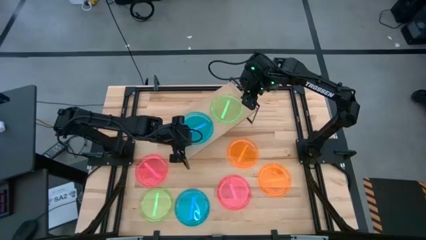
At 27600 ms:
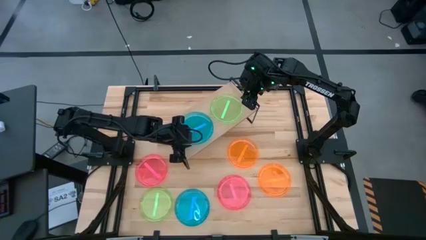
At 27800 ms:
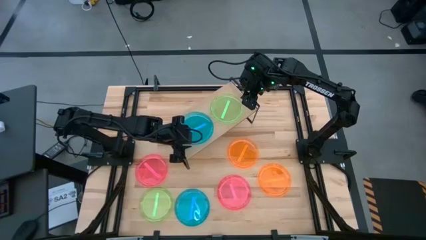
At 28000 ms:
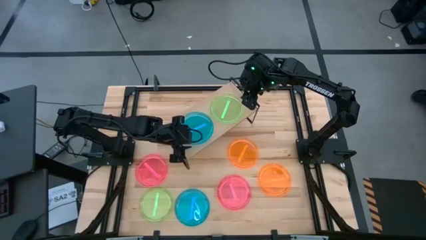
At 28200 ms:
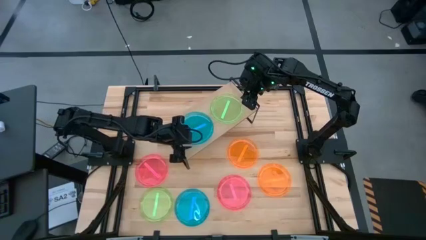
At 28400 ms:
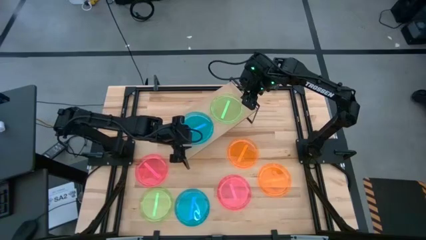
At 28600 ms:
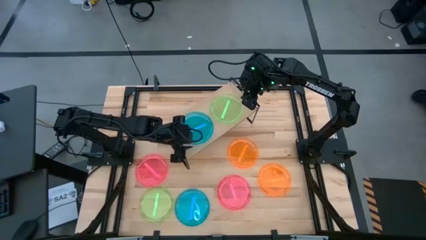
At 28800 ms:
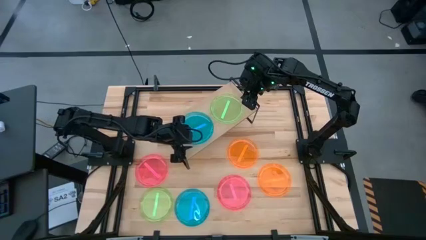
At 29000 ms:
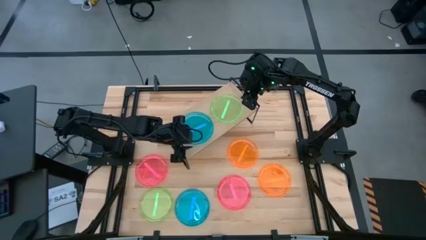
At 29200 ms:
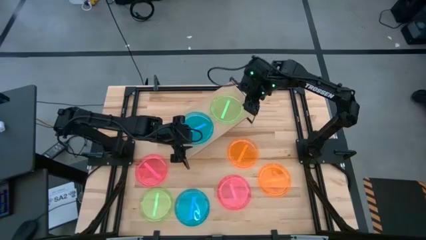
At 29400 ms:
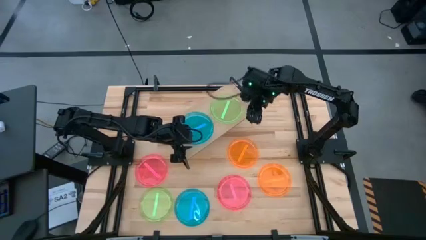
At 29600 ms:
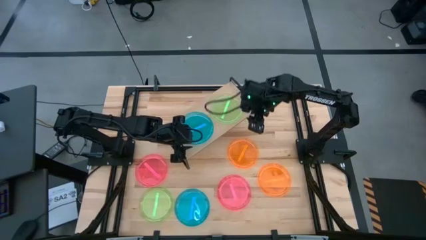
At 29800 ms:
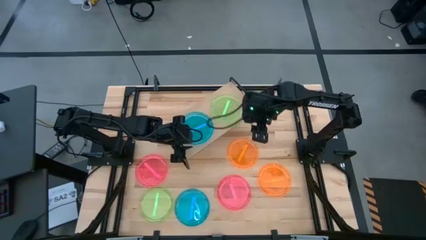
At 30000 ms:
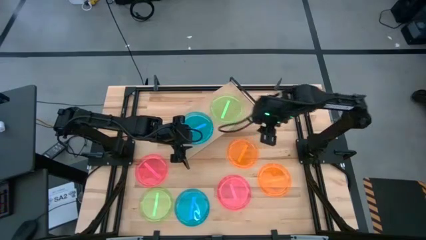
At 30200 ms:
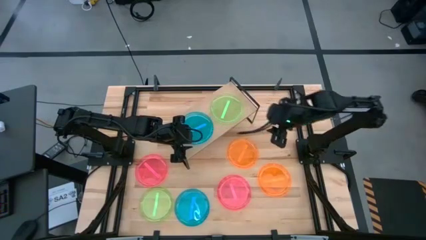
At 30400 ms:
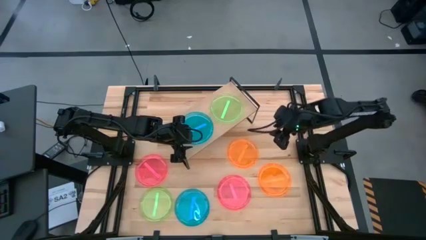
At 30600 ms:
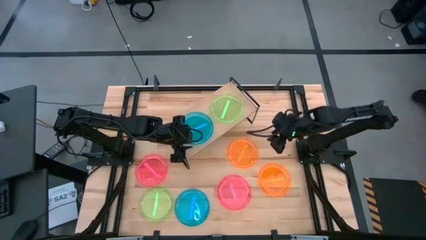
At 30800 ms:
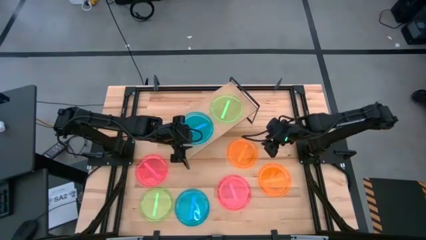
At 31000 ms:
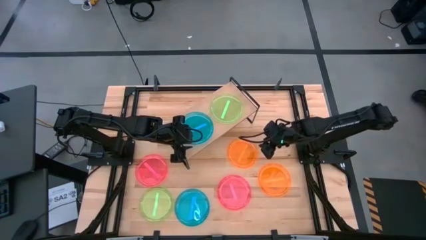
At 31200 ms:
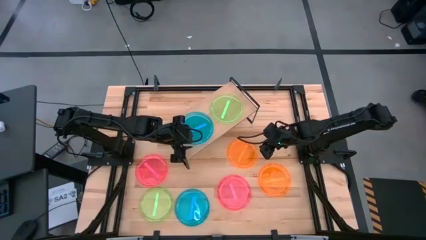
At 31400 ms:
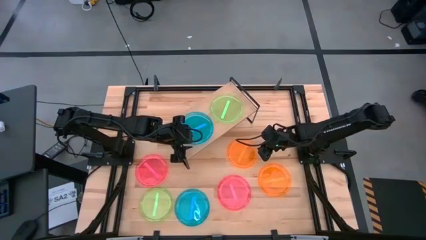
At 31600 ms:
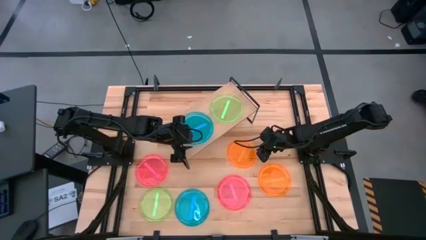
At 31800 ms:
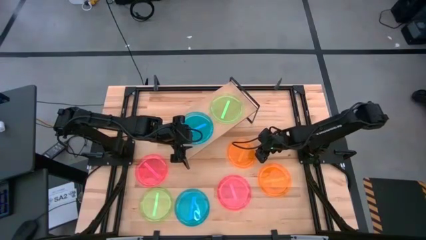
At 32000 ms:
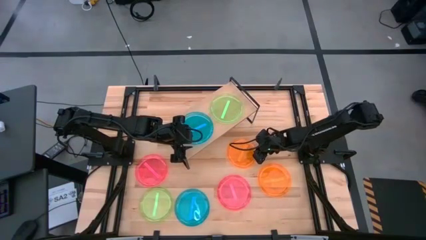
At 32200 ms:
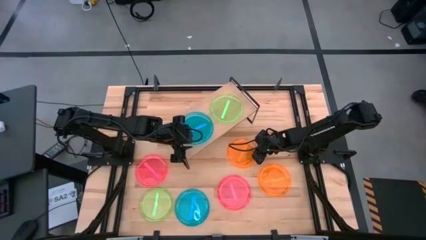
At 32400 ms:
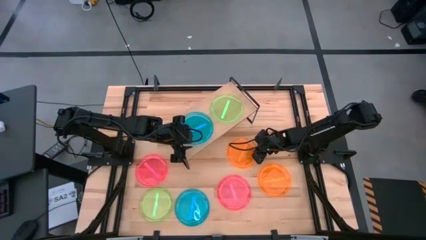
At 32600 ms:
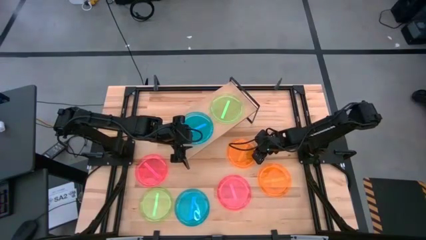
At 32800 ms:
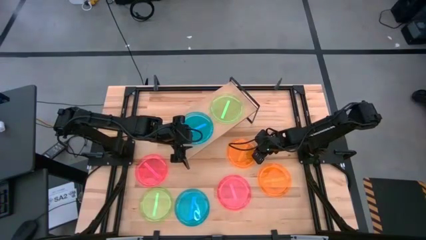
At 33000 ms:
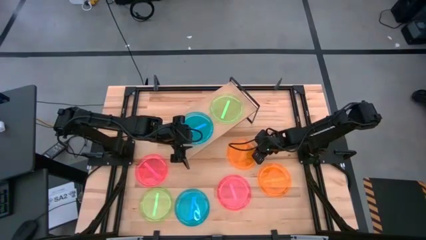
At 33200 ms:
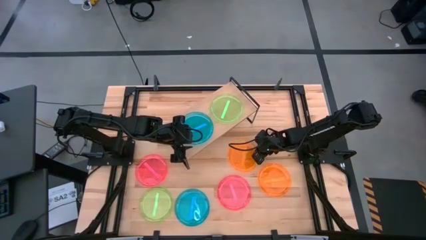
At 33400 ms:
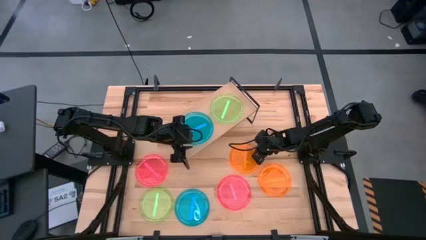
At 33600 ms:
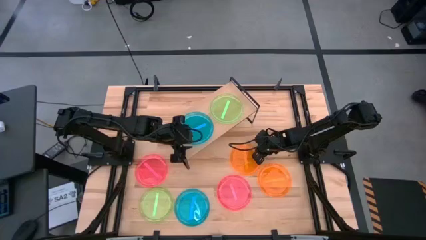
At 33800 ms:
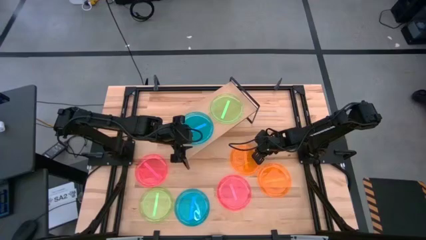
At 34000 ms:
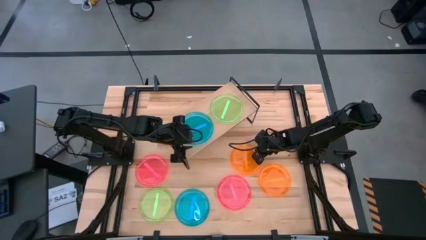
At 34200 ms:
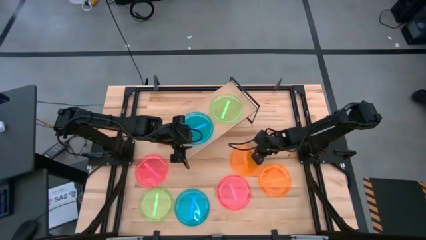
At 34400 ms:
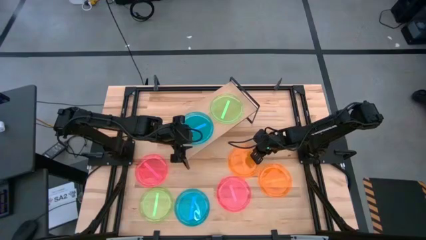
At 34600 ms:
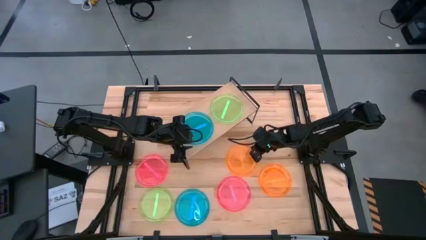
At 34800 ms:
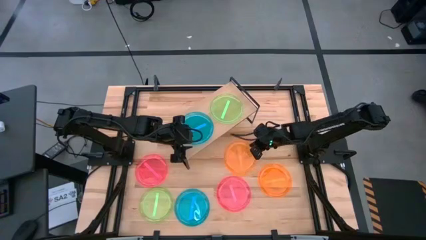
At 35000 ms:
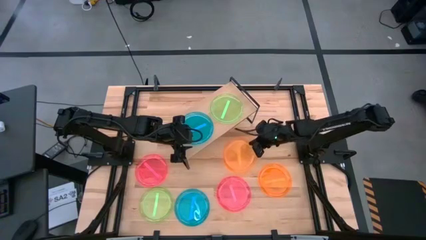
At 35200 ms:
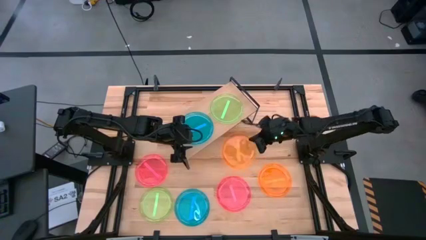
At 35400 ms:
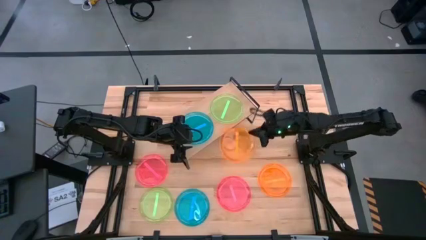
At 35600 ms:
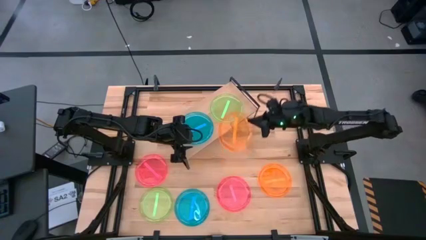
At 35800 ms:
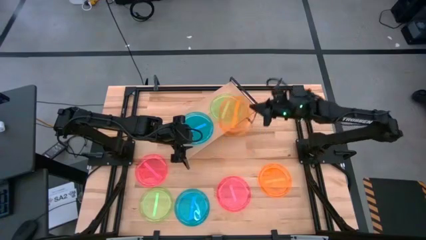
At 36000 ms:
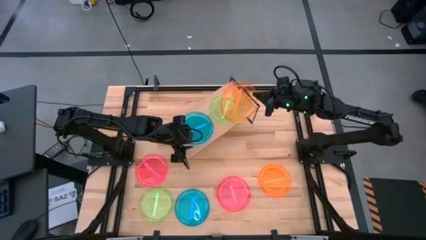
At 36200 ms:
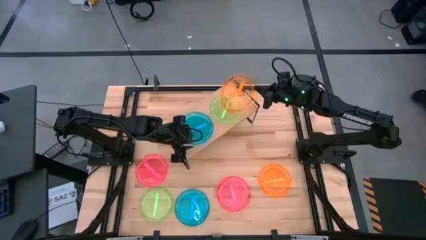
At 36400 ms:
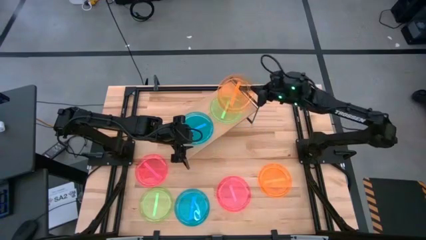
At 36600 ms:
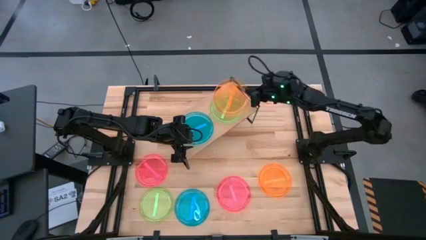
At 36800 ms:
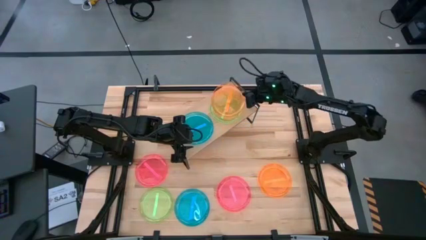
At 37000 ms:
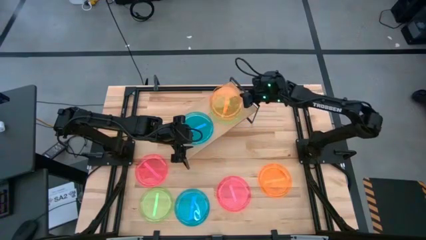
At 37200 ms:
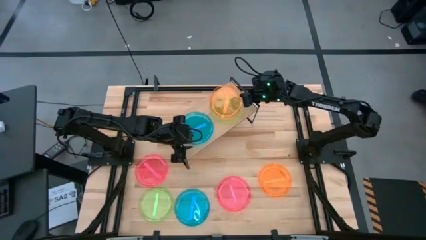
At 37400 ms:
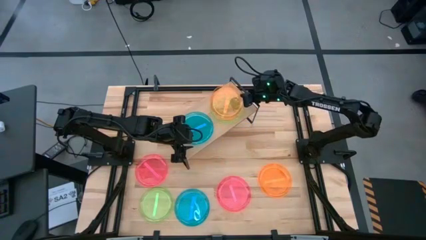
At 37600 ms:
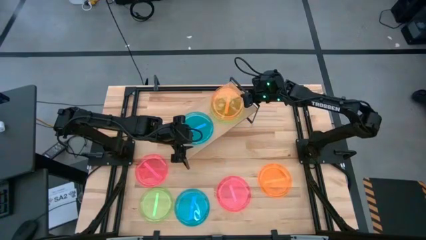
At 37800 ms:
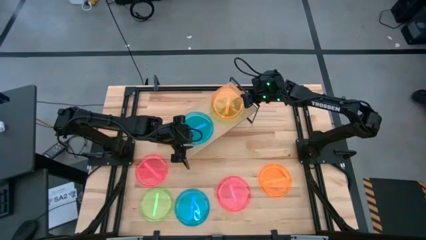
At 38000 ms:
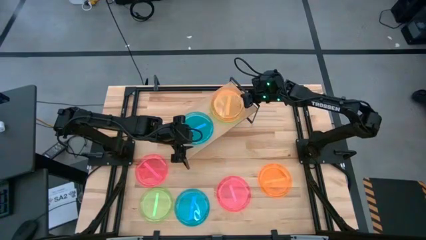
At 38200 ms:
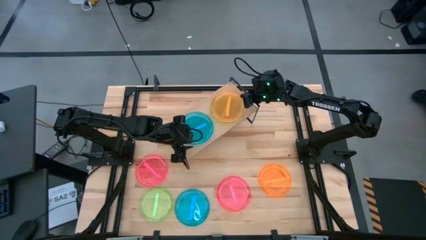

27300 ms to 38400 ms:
Task: Place and stack plates onto a shelf
Stack the top orange plate on the green plate on the shelf
